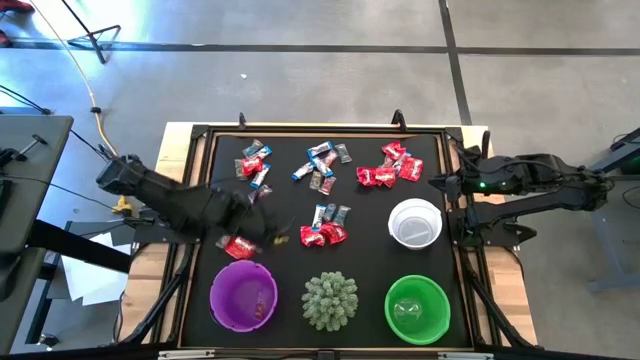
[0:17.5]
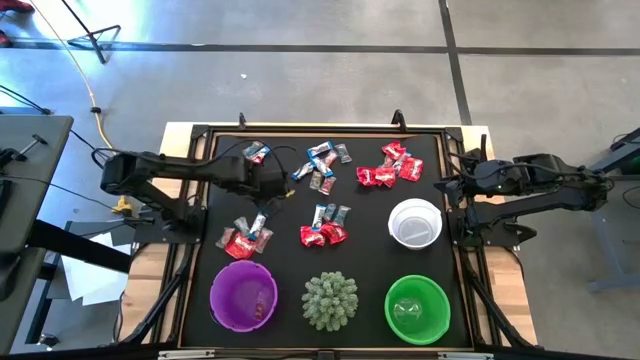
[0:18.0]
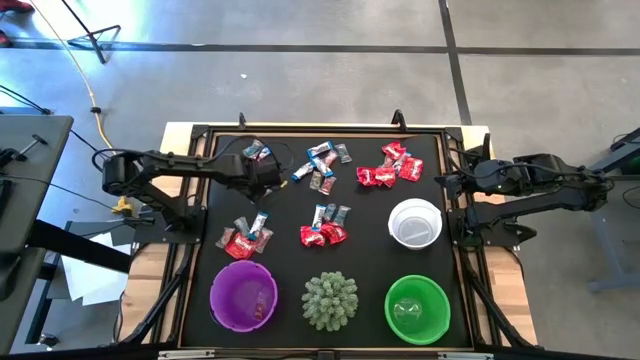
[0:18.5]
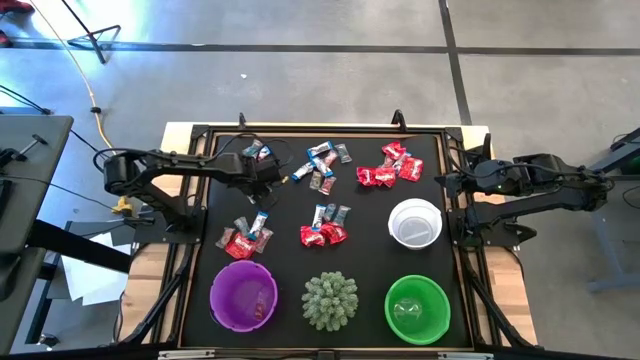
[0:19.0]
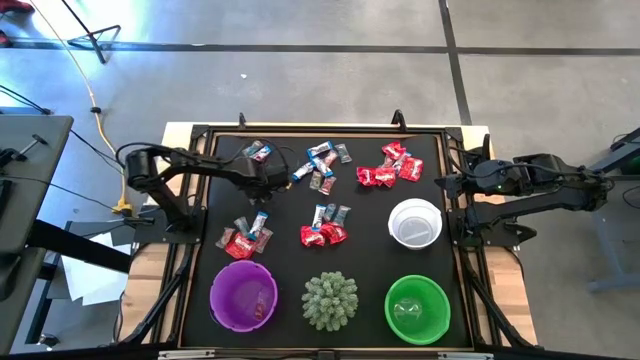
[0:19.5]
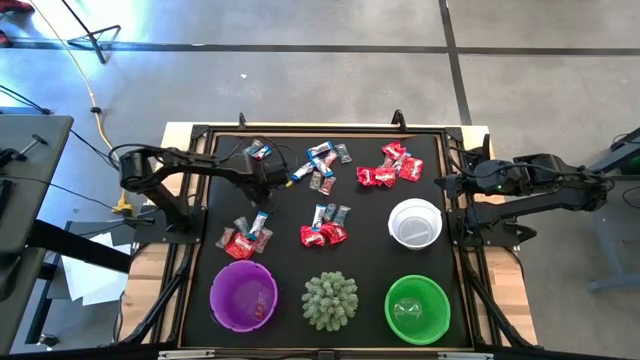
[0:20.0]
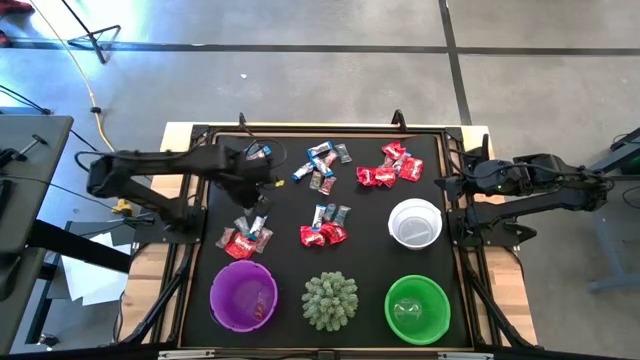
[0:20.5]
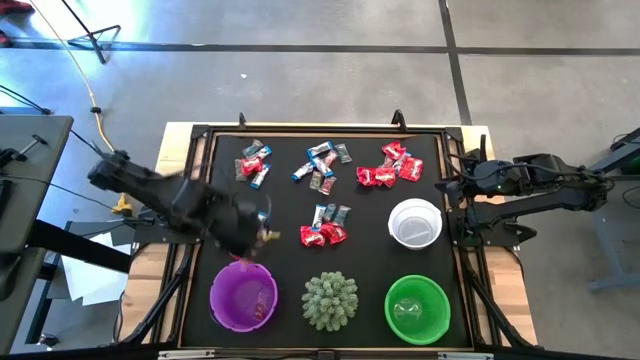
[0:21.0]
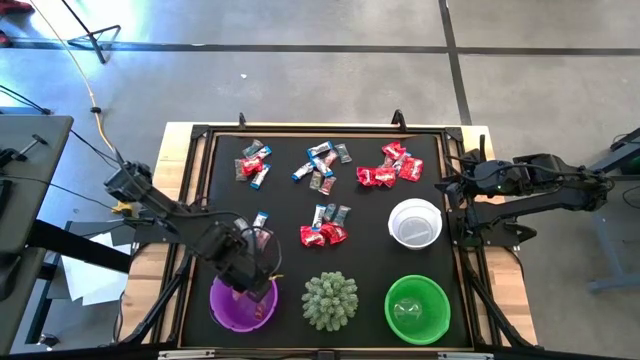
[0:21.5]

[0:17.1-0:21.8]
Task: Sort candy
Put the transparent candy wrapper into the purple bucket

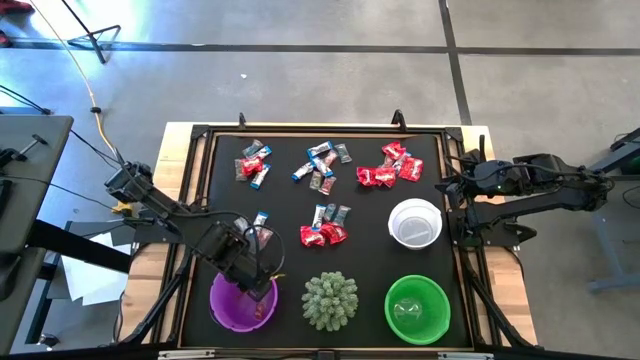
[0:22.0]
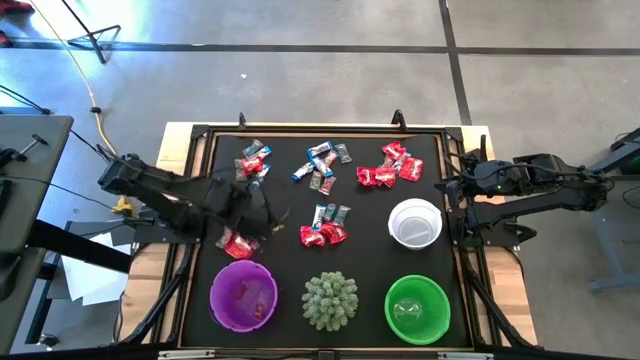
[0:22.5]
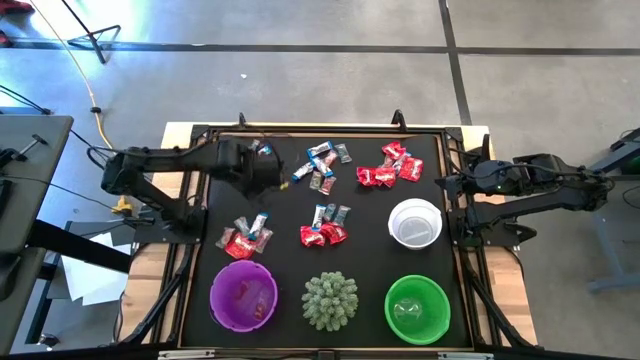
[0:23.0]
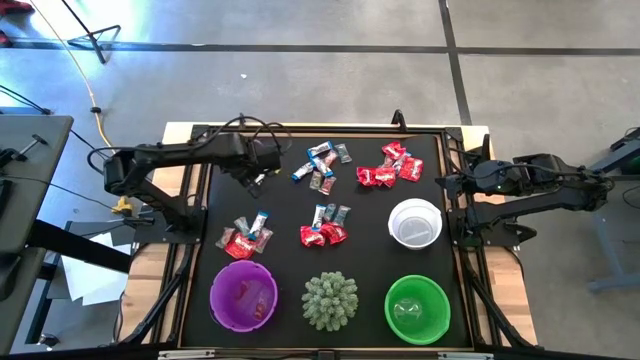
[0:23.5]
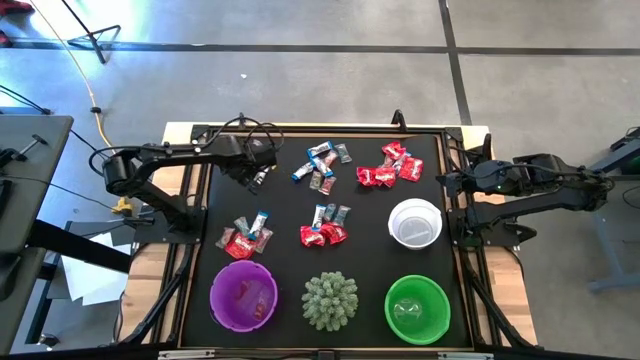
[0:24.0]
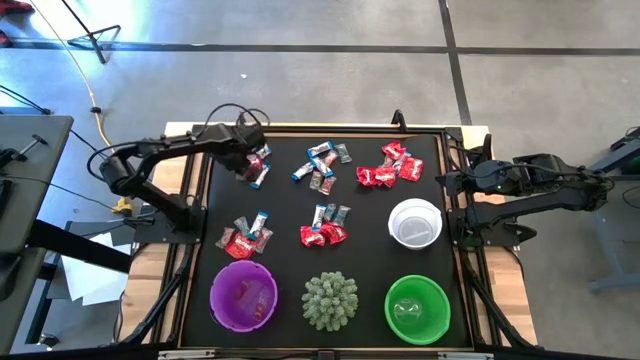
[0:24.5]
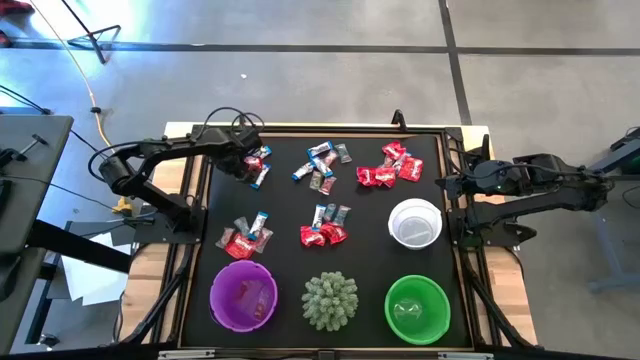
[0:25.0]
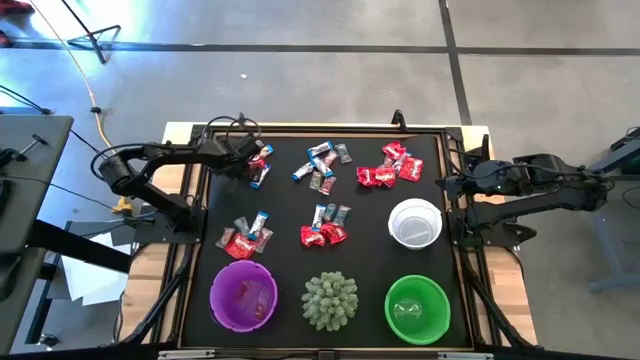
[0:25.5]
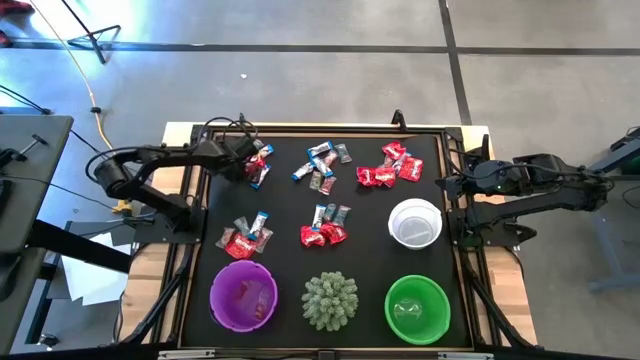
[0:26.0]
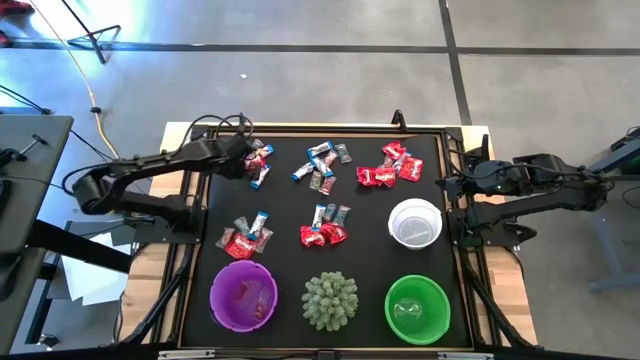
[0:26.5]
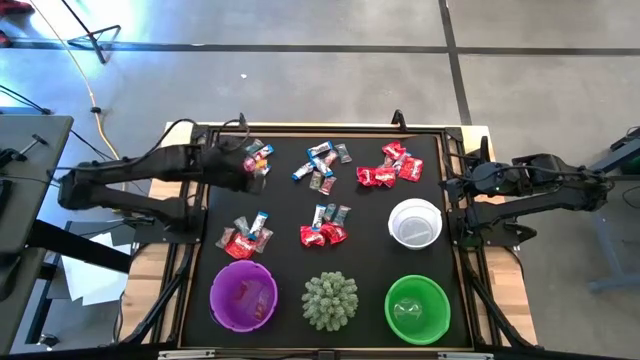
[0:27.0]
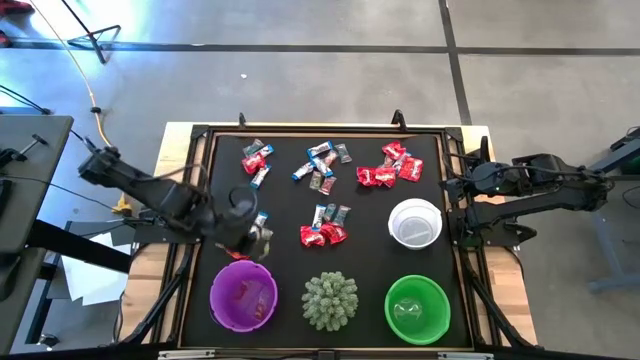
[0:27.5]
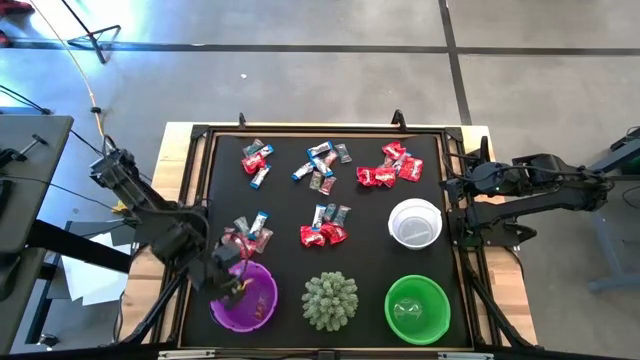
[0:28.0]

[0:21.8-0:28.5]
Put the transparent candy wrapper into the purple bucket

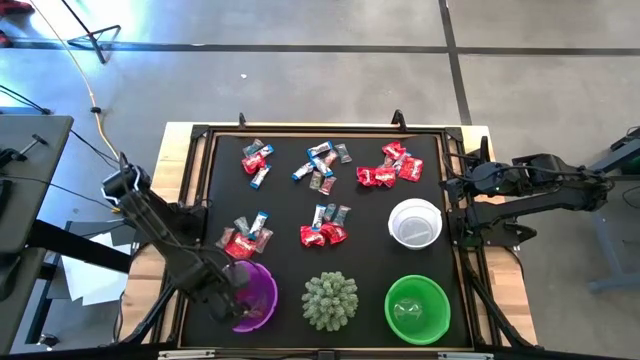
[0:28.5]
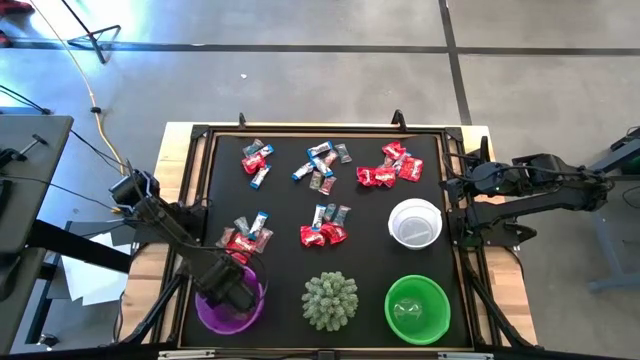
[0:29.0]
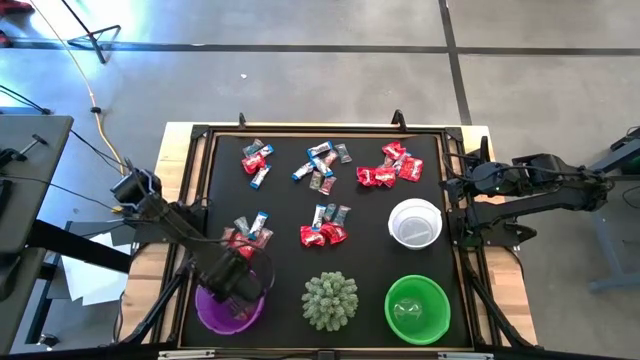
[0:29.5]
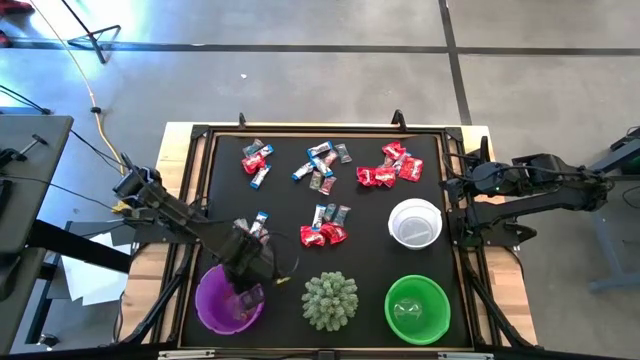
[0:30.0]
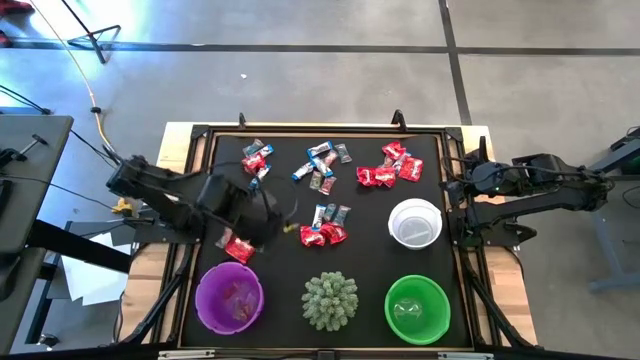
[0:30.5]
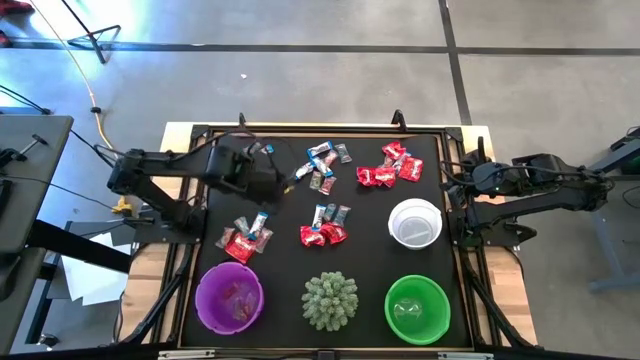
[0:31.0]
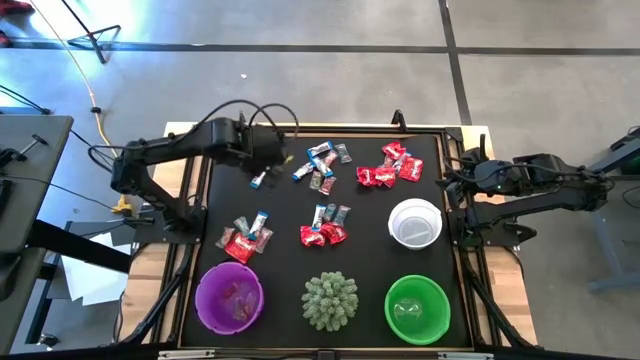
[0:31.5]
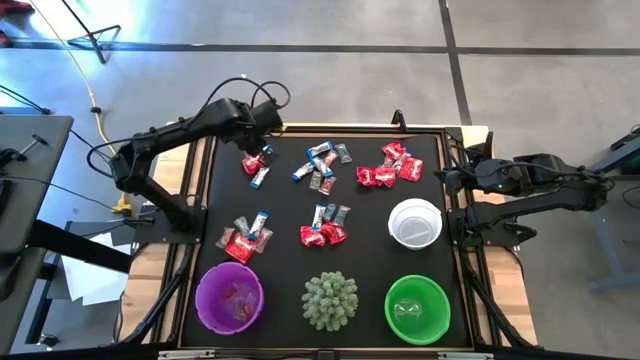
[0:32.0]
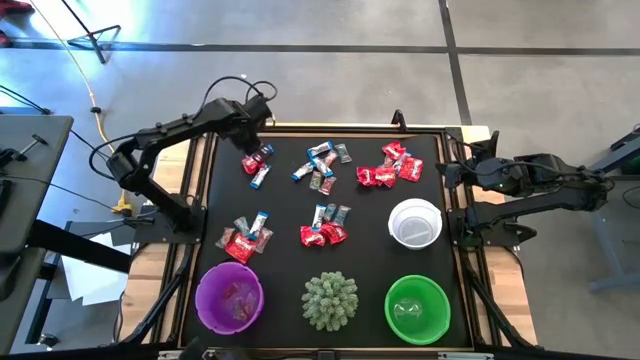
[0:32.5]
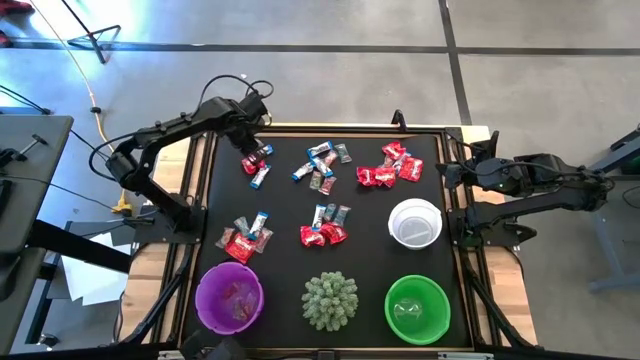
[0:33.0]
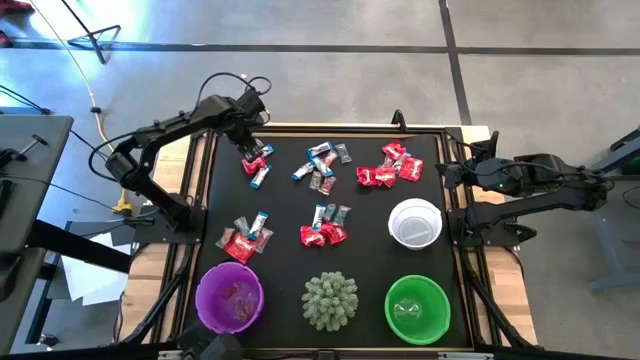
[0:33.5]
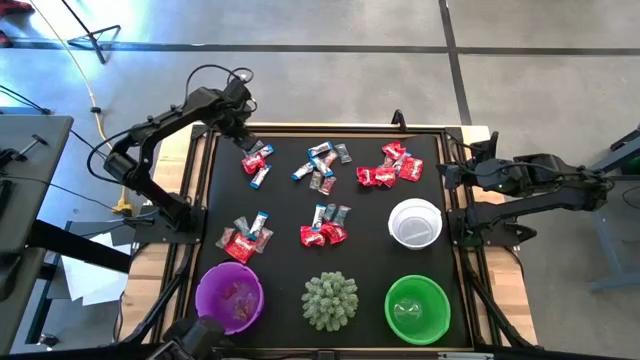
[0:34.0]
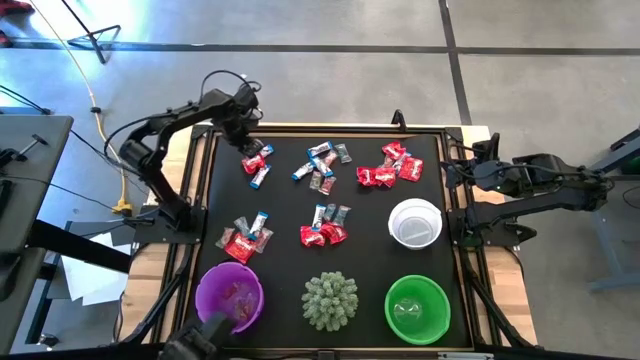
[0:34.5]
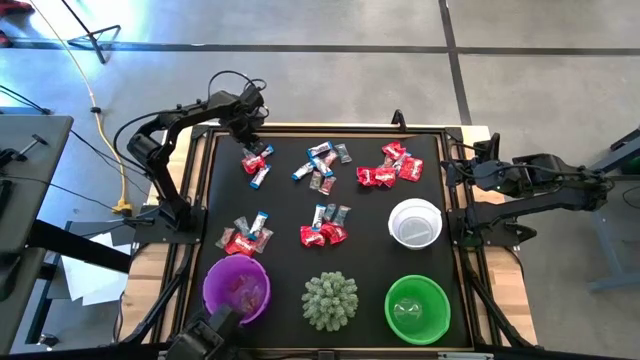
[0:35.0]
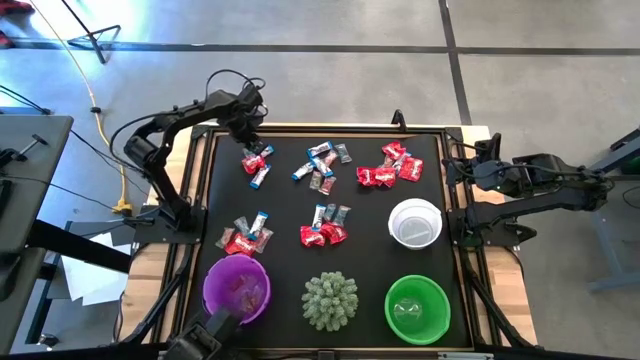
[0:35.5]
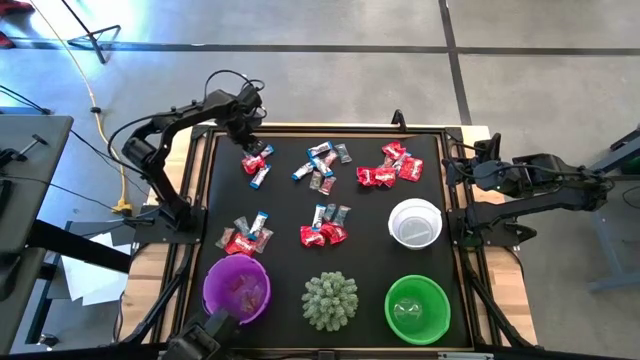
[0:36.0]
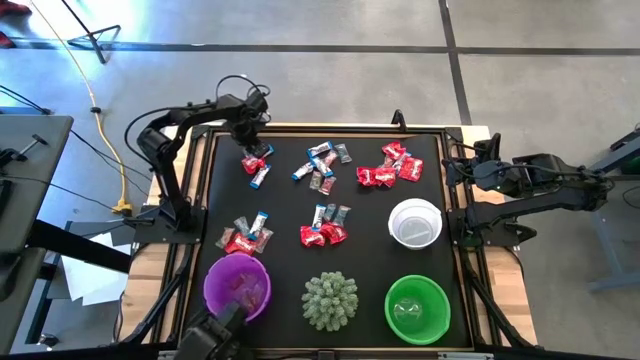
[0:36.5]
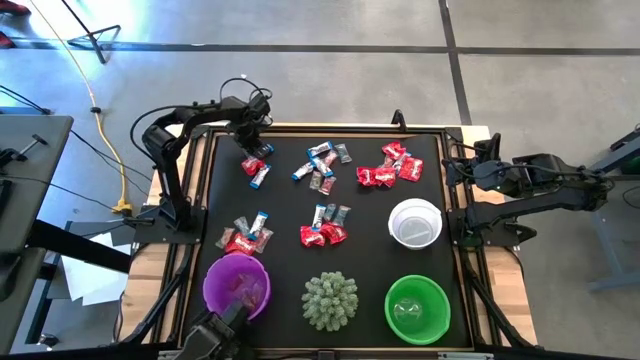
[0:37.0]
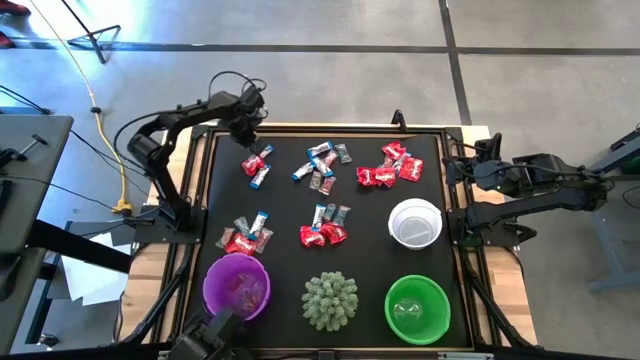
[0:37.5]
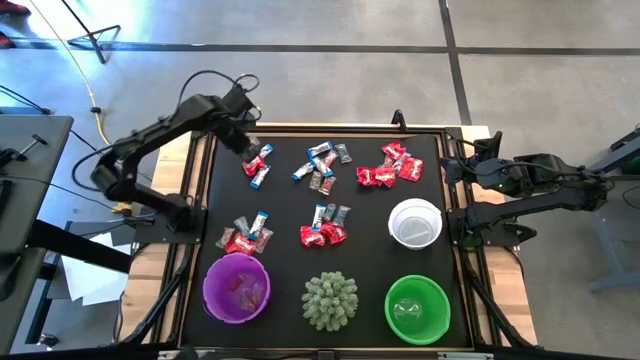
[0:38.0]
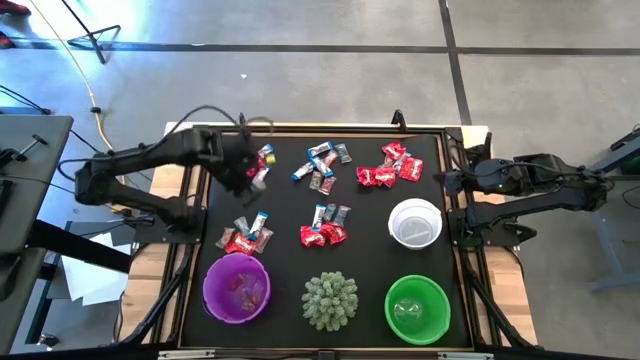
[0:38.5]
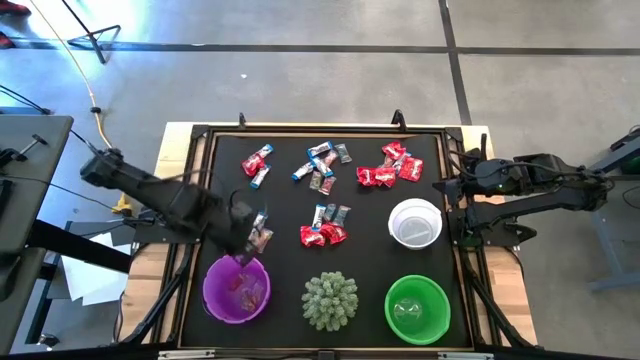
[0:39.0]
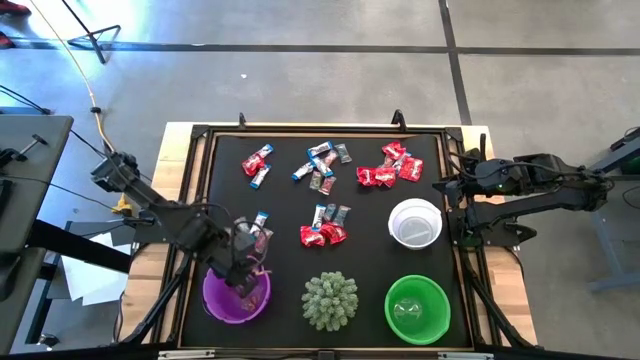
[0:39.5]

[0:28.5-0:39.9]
Put the transparent candy wrapper into the purple bucket
